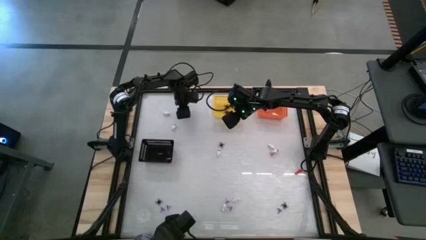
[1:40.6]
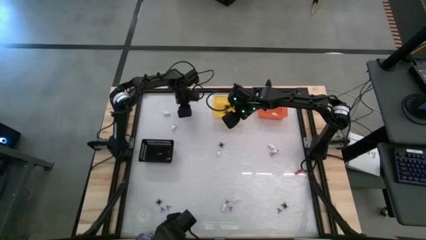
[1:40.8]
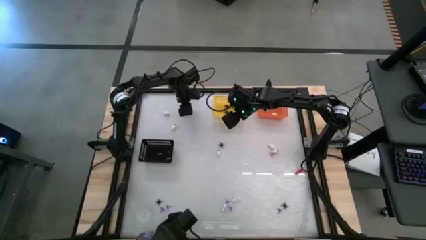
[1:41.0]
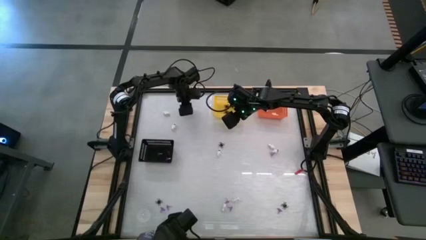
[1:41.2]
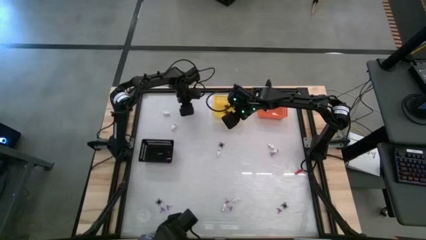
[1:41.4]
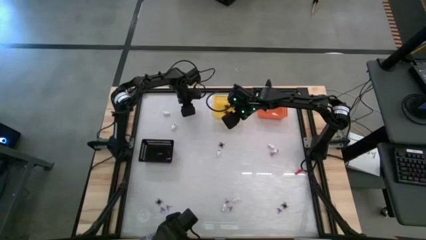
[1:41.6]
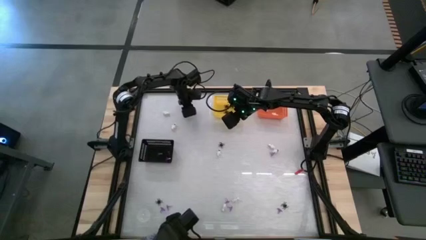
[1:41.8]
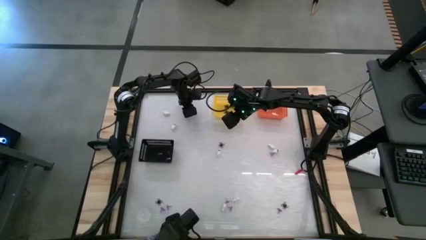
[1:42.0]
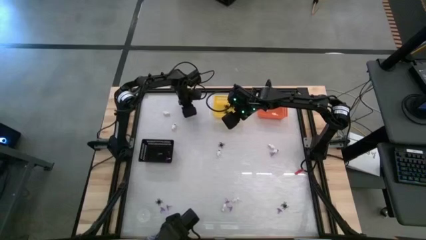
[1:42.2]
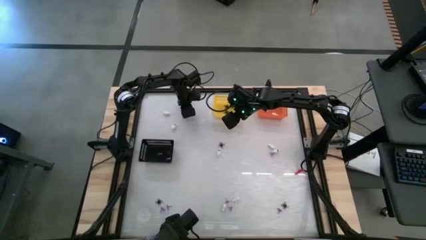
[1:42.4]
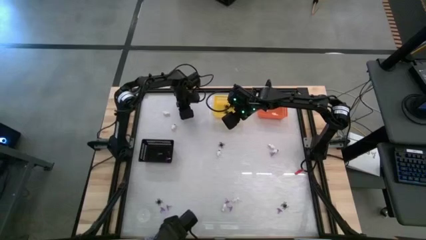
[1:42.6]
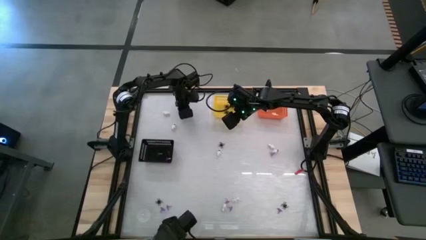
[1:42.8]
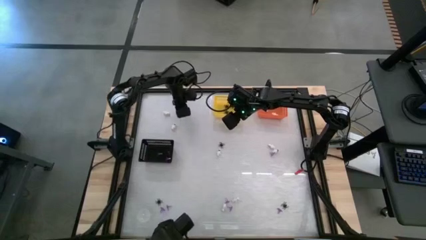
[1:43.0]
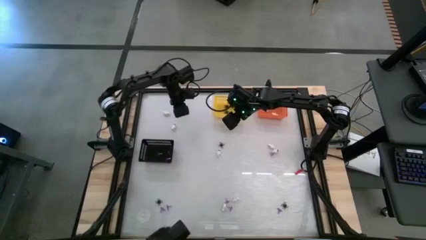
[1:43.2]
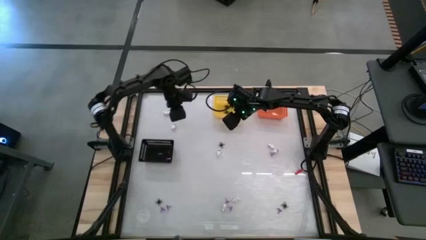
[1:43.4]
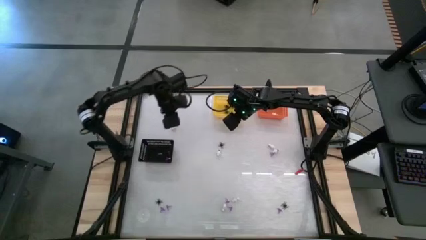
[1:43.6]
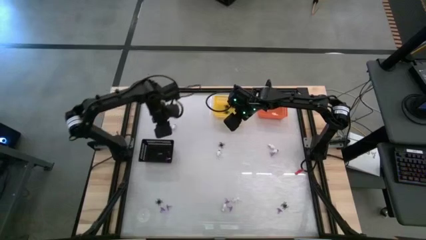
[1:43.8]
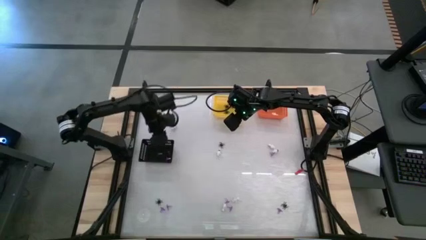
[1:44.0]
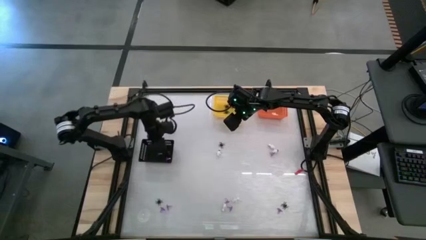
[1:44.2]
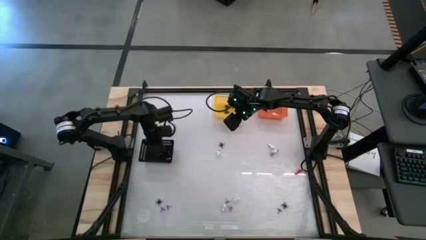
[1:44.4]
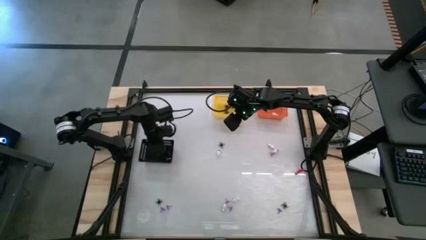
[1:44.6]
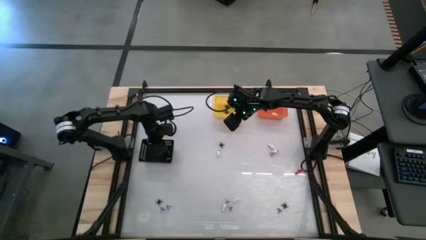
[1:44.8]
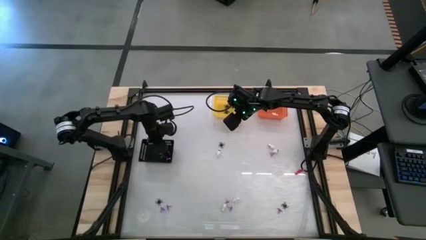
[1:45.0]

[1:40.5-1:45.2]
Task: Sort Halloween decoration
Put the purple witch hat toy into the black bin

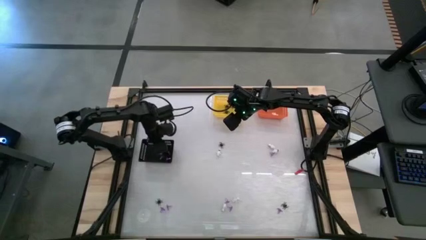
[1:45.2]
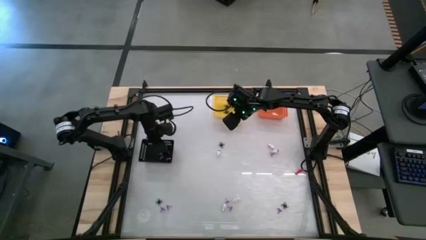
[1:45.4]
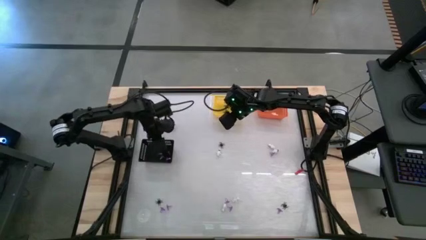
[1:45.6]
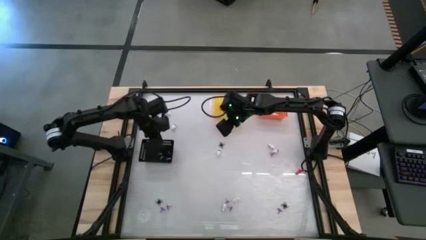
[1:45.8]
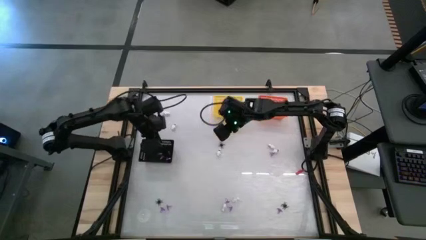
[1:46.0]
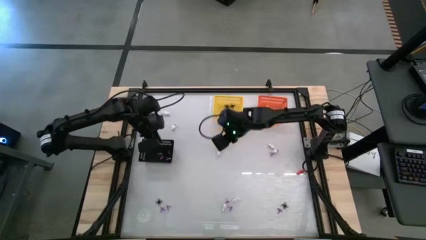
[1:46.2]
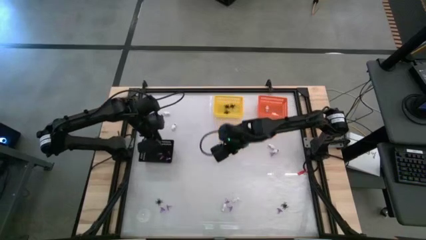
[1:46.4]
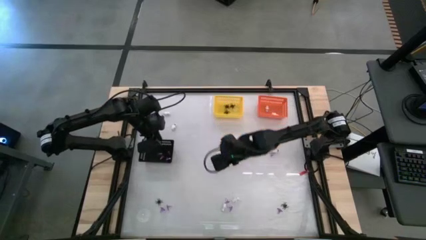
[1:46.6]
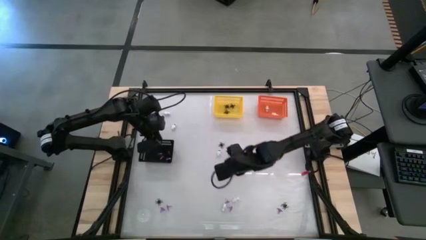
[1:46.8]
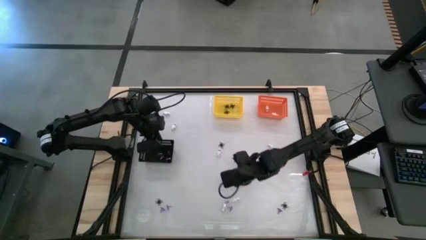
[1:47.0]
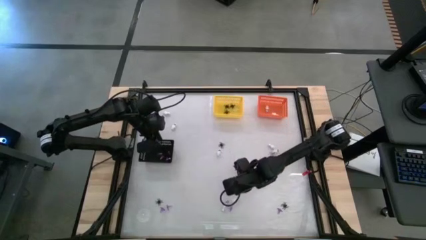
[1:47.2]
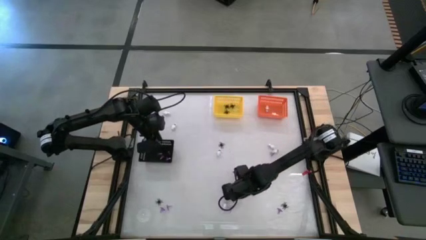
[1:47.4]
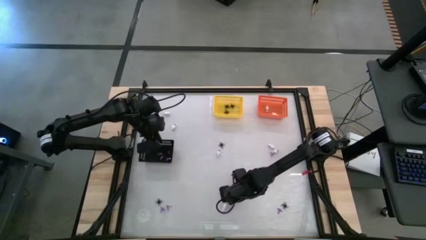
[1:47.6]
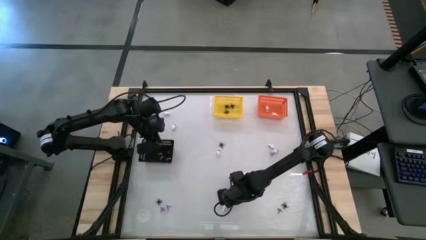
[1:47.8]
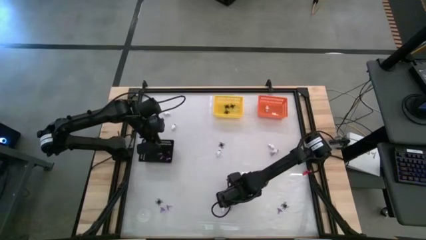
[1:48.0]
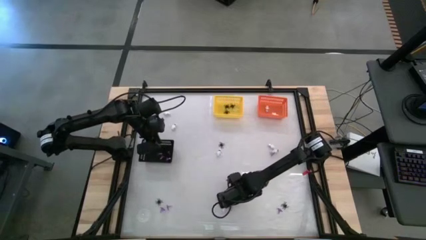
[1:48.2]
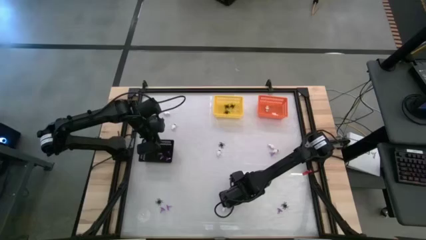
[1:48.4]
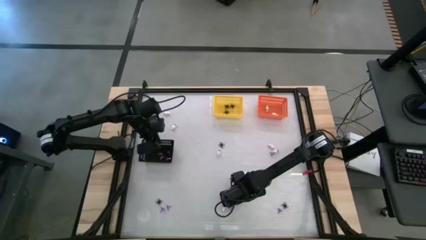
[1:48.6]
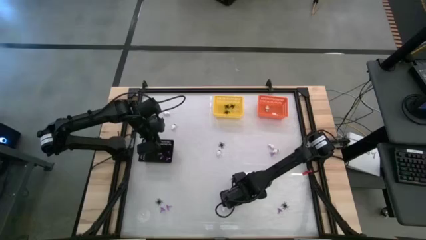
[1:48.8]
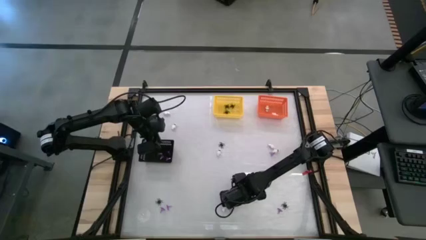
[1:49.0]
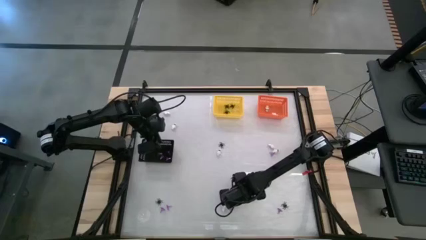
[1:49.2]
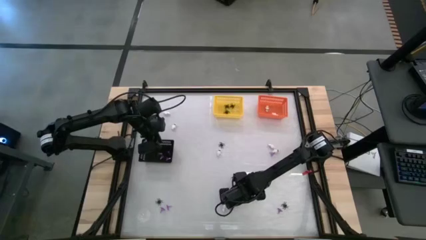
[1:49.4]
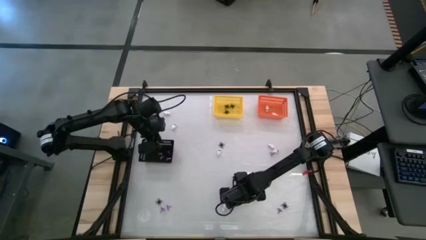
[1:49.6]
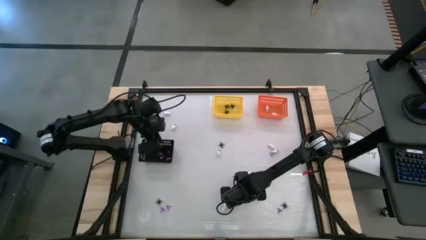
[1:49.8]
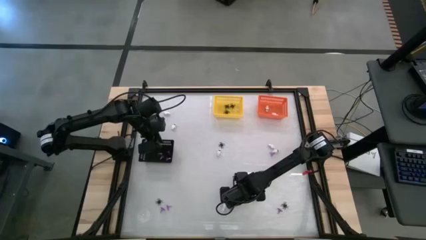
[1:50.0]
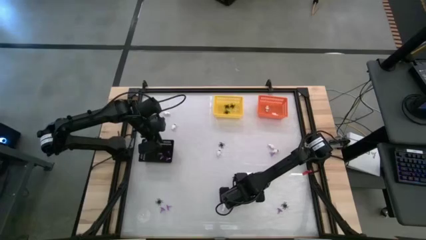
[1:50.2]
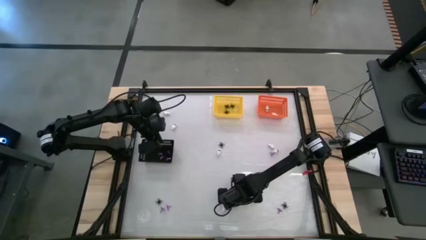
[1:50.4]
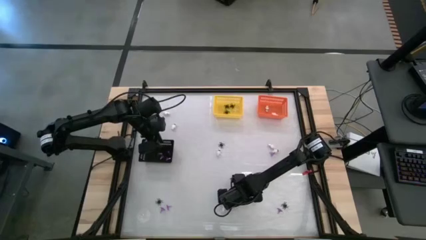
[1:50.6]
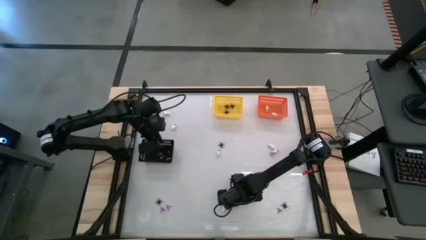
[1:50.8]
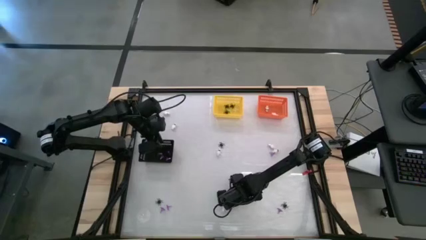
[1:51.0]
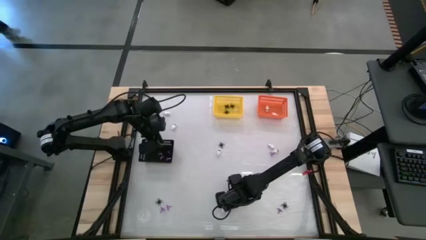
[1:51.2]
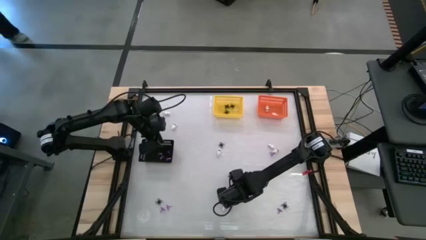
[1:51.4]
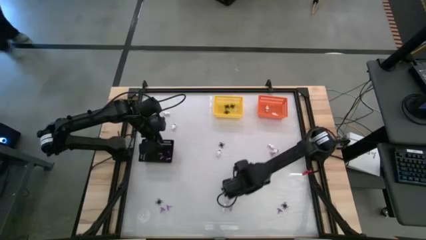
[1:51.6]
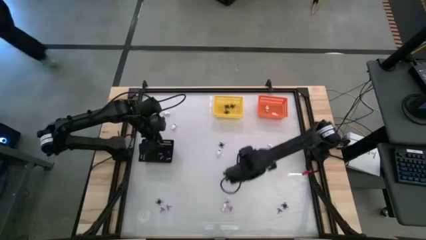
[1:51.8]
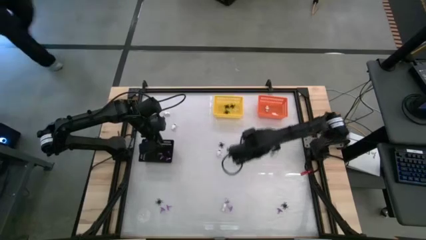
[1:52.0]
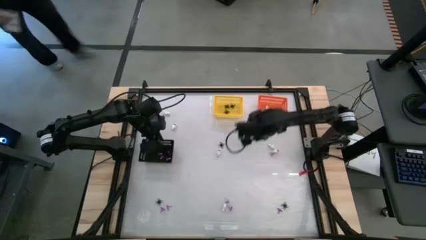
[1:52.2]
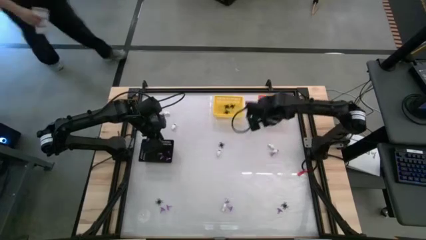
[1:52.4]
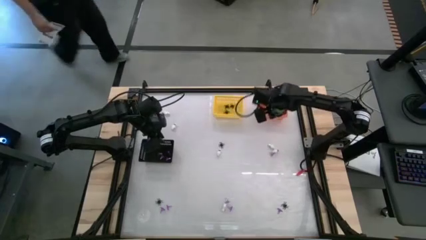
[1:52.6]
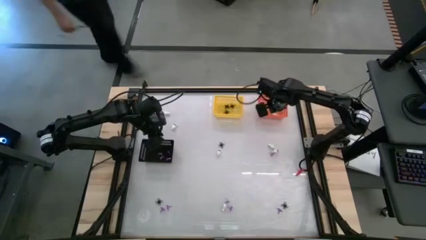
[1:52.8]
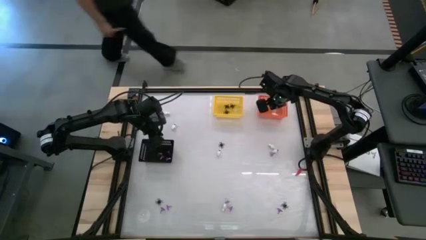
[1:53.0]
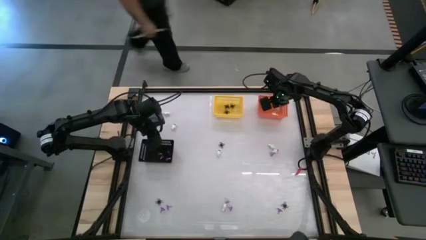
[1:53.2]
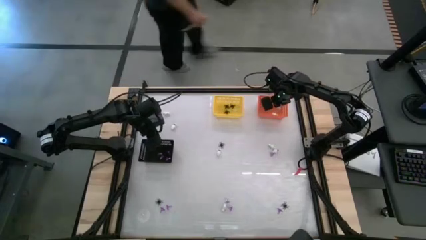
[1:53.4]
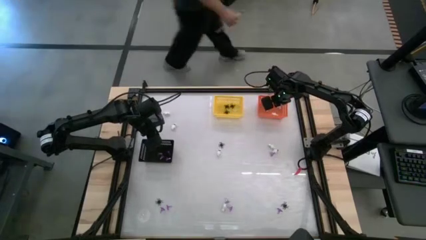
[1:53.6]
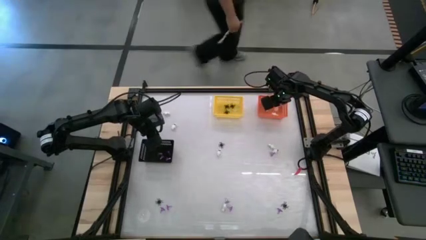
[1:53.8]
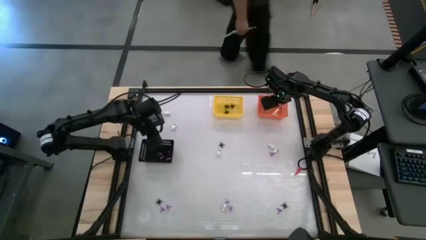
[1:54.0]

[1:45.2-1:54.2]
Put the white skeleton toy into the orange bin

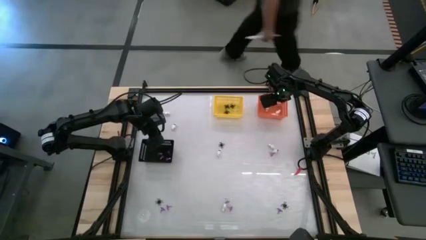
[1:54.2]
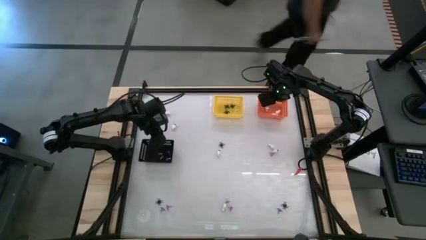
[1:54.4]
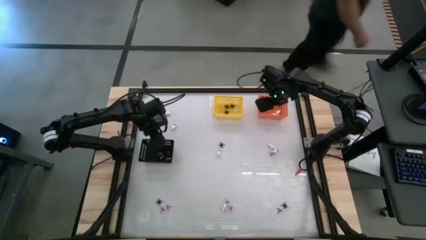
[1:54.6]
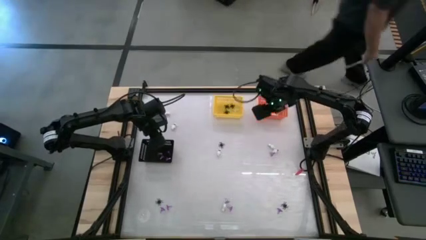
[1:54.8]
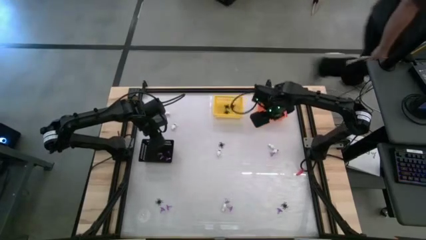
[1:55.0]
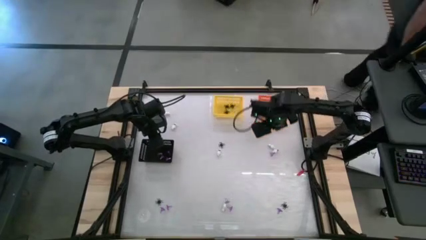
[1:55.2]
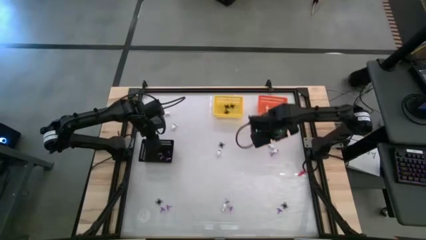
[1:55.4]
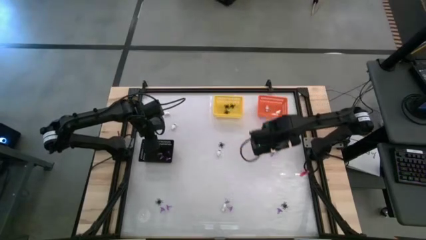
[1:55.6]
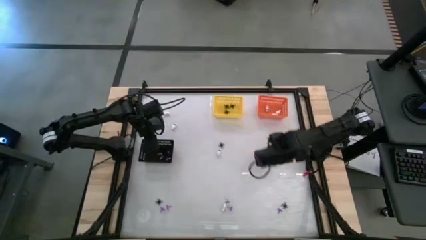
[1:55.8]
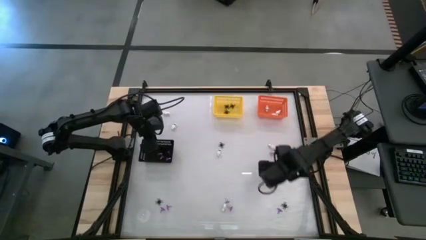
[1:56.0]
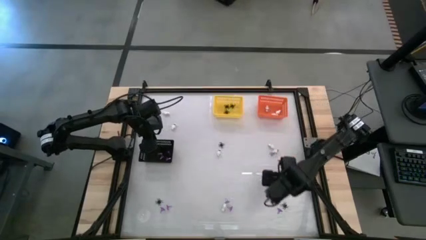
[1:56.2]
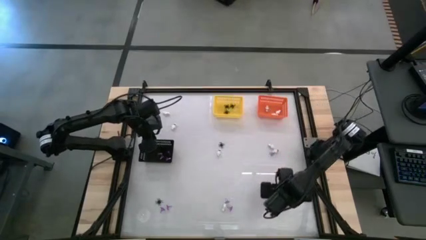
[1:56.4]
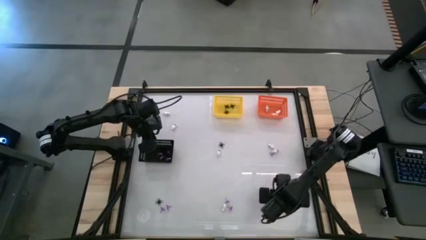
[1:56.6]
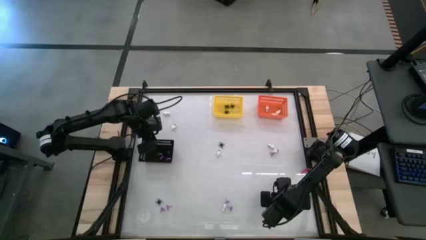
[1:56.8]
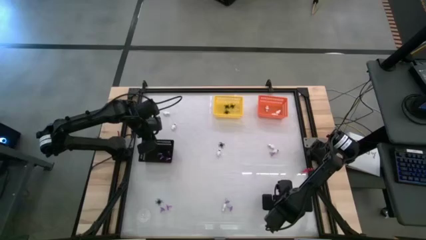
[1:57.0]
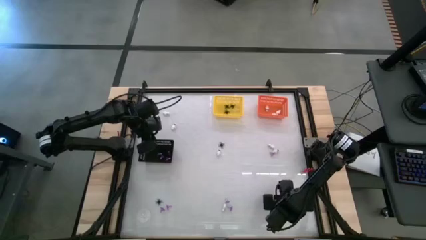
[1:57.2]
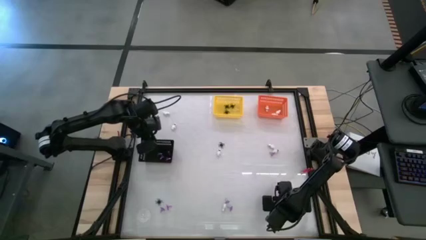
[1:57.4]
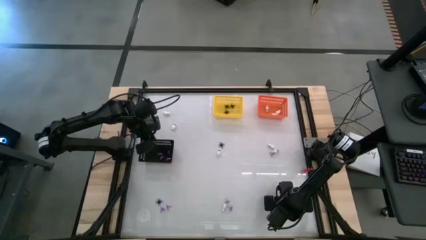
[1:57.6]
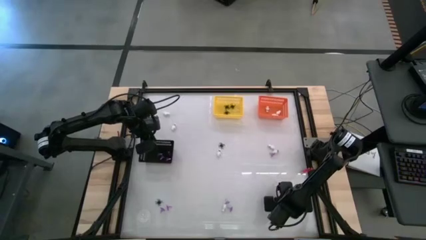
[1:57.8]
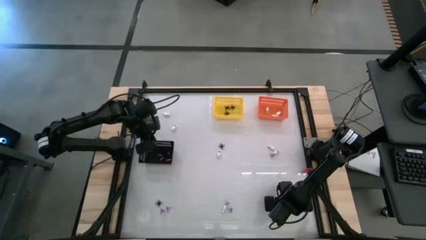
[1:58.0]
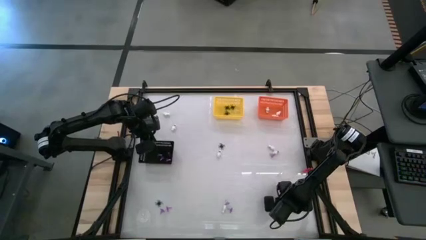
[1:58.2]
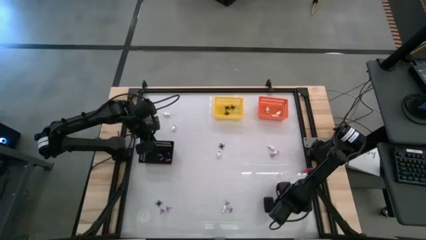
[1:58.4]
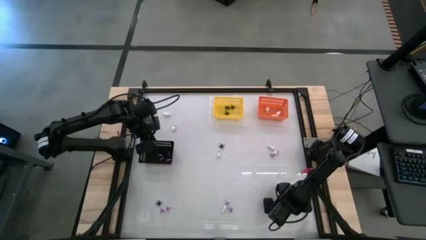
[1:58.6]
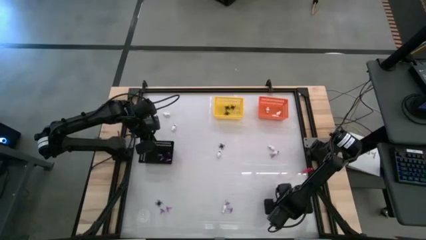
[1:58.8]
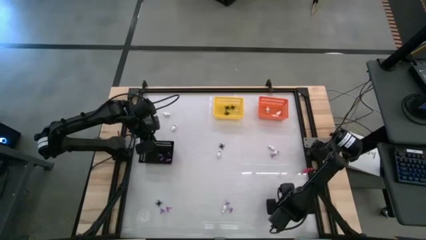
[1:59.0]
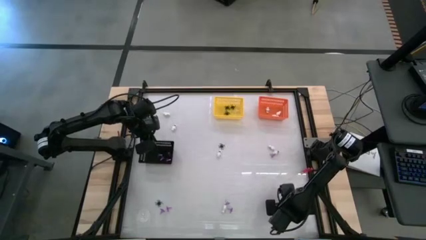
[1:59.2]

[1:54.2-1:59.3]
Put the black spider toy into the yellow bin
